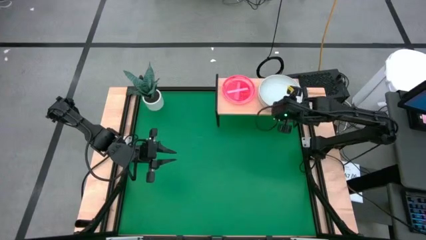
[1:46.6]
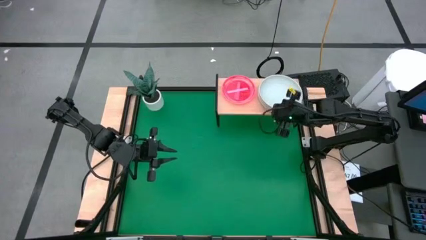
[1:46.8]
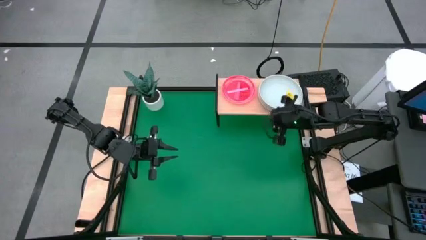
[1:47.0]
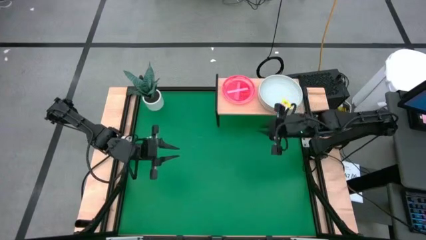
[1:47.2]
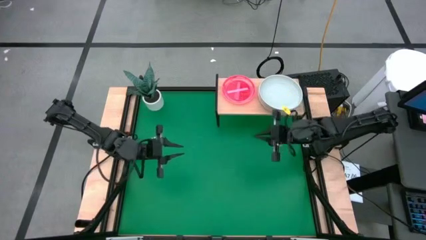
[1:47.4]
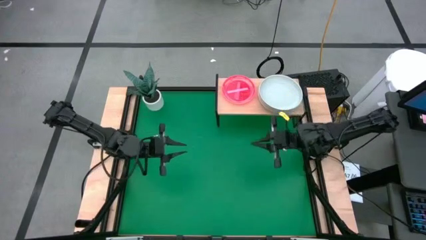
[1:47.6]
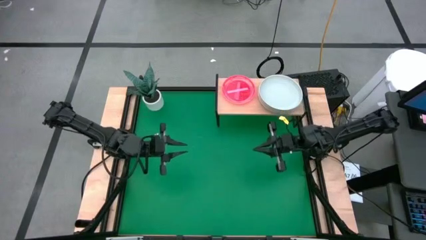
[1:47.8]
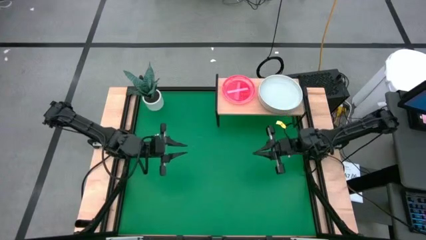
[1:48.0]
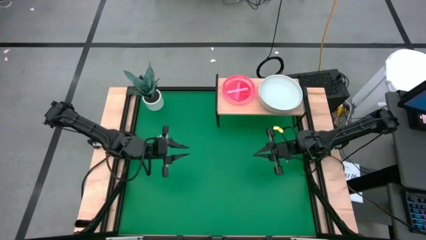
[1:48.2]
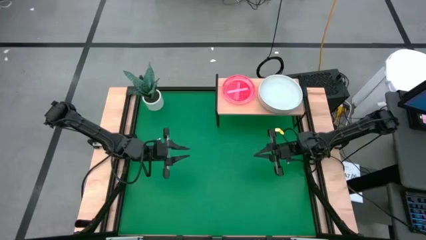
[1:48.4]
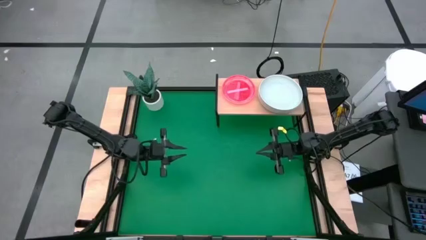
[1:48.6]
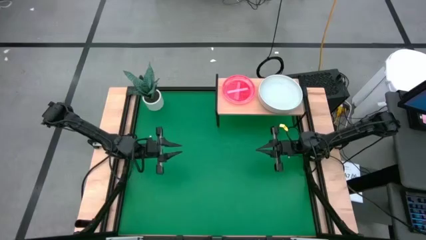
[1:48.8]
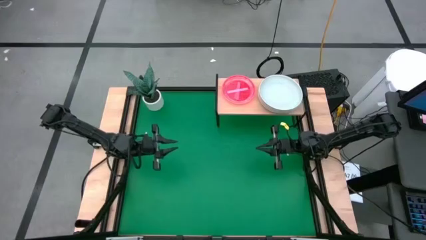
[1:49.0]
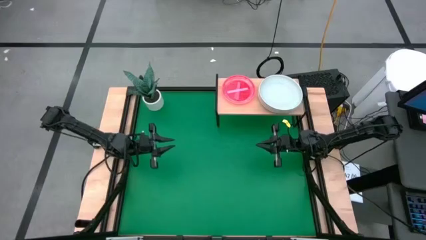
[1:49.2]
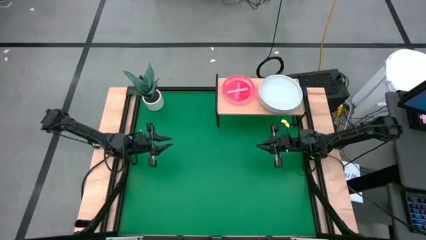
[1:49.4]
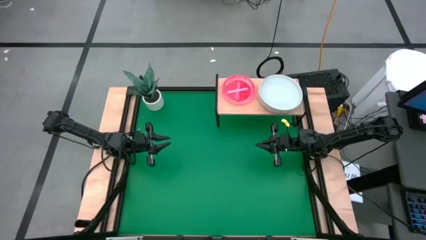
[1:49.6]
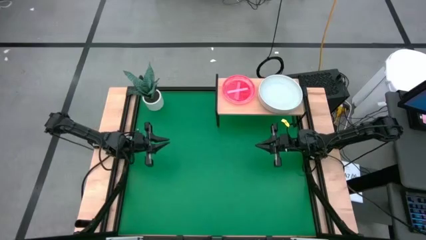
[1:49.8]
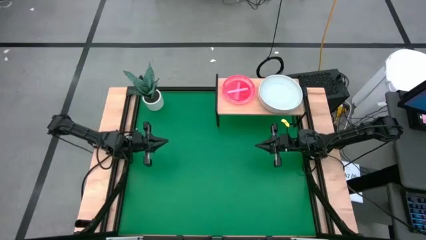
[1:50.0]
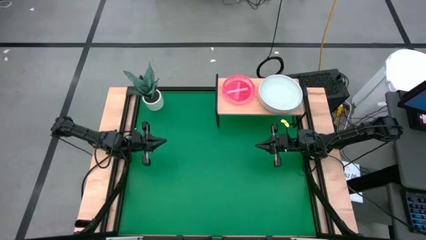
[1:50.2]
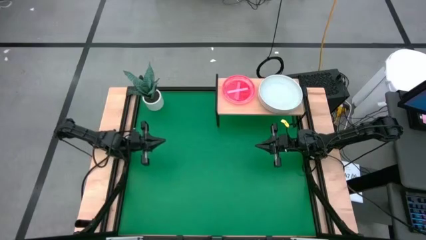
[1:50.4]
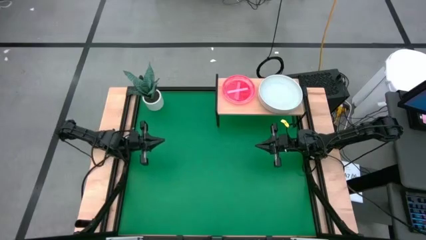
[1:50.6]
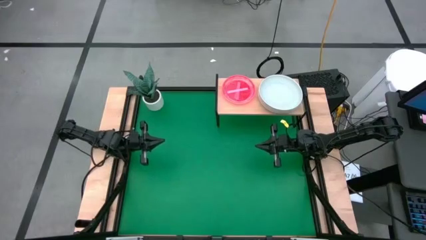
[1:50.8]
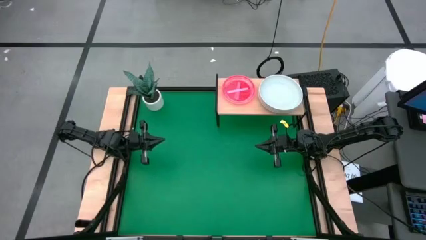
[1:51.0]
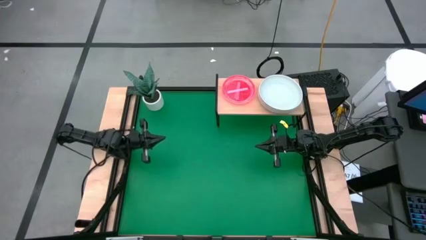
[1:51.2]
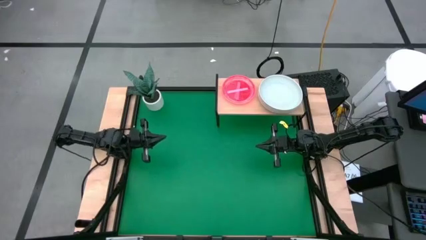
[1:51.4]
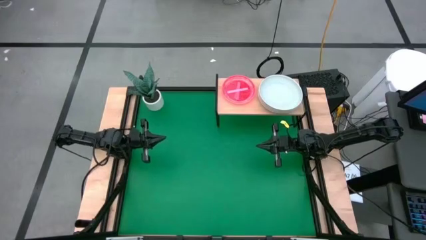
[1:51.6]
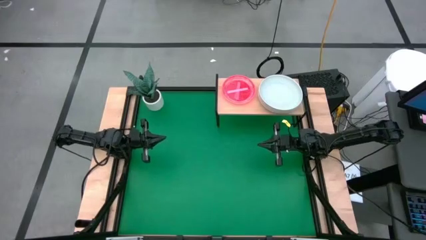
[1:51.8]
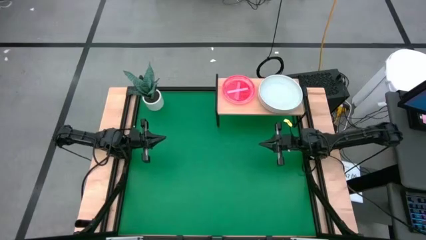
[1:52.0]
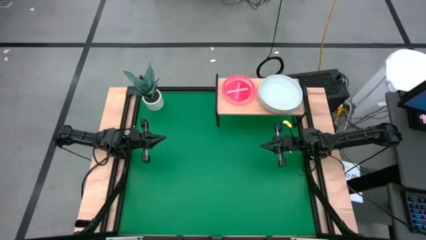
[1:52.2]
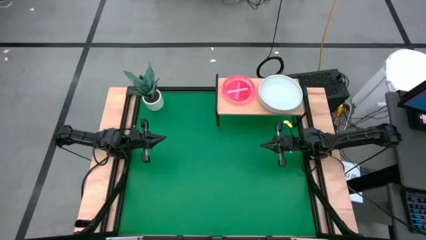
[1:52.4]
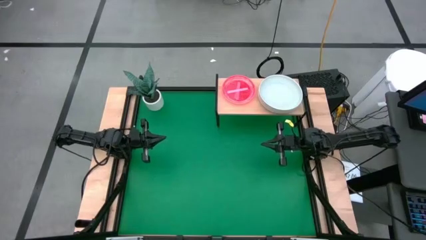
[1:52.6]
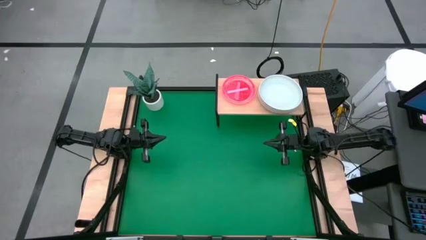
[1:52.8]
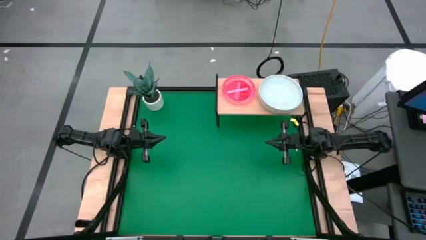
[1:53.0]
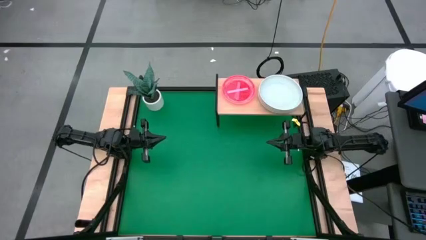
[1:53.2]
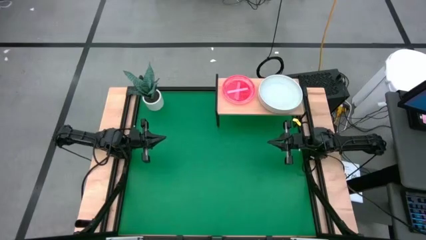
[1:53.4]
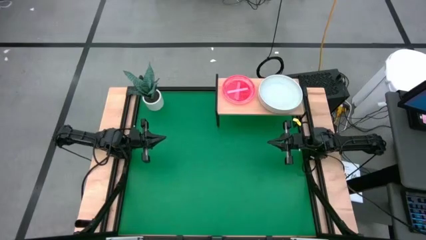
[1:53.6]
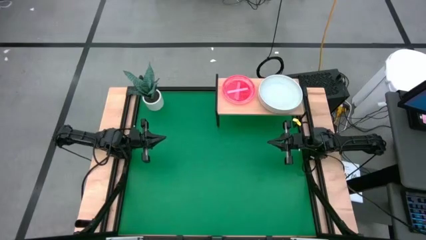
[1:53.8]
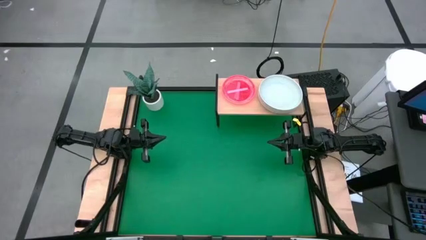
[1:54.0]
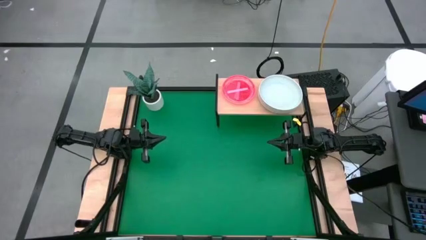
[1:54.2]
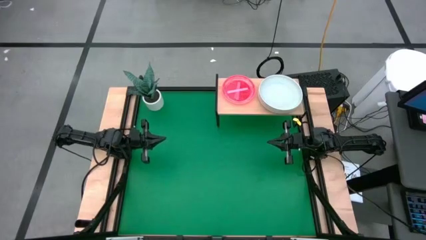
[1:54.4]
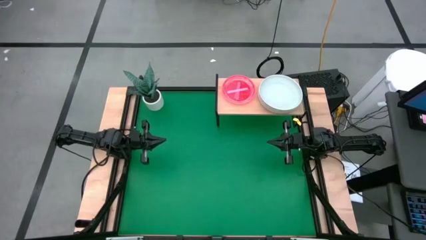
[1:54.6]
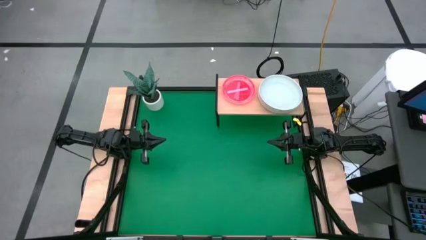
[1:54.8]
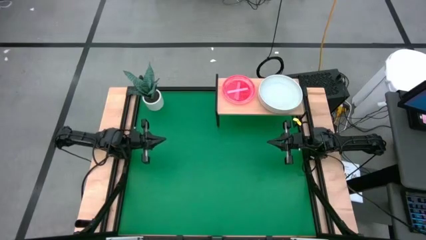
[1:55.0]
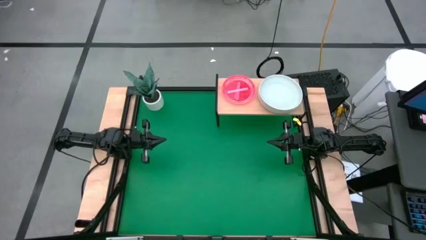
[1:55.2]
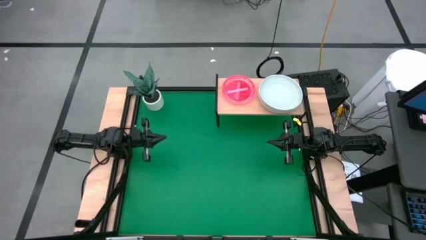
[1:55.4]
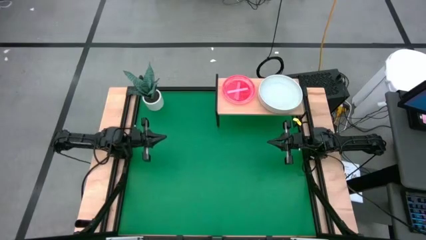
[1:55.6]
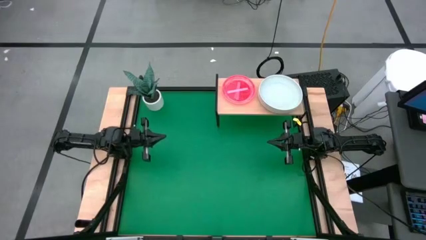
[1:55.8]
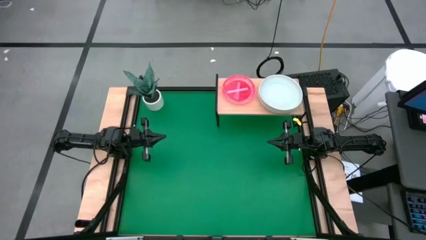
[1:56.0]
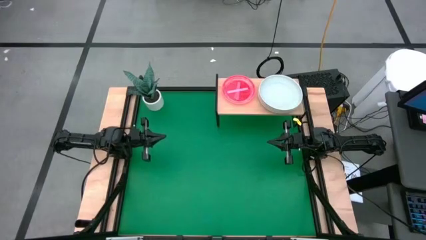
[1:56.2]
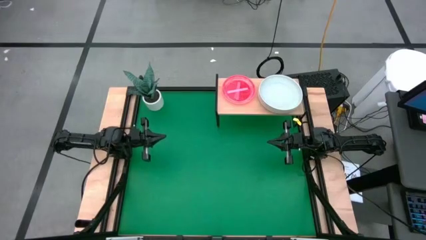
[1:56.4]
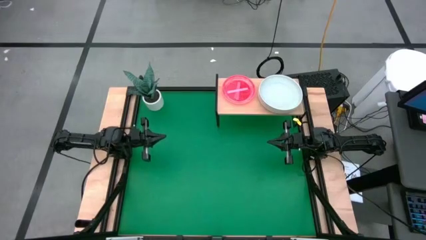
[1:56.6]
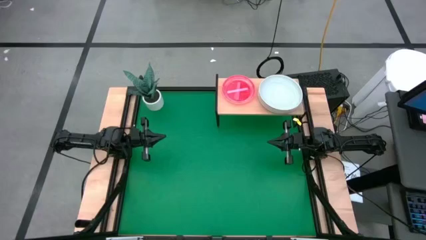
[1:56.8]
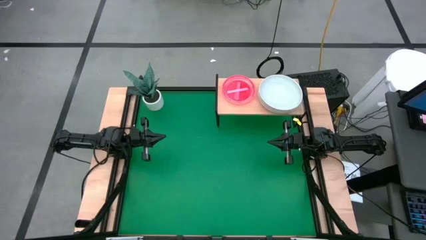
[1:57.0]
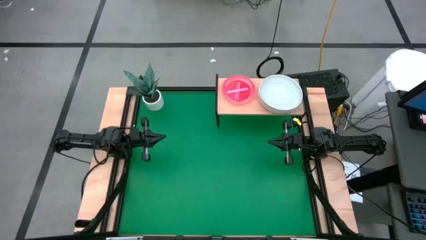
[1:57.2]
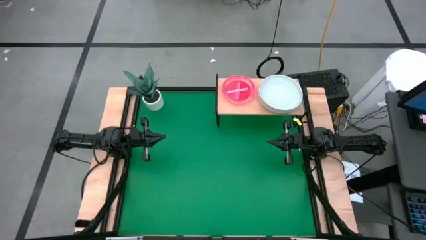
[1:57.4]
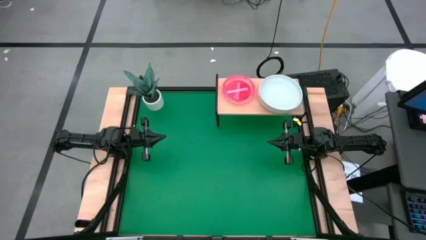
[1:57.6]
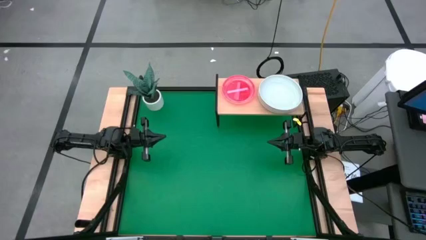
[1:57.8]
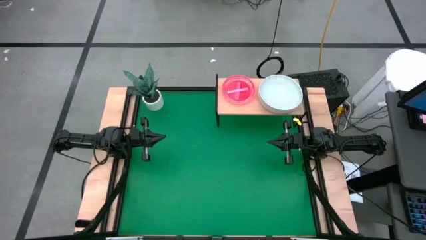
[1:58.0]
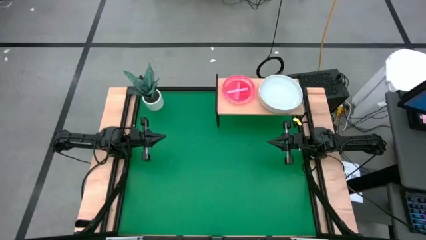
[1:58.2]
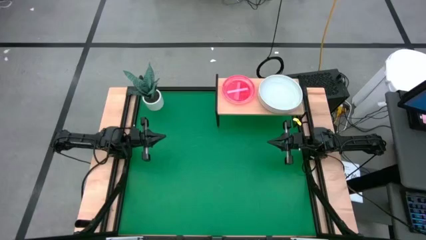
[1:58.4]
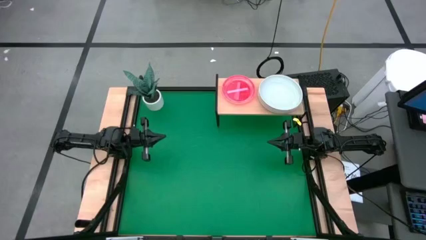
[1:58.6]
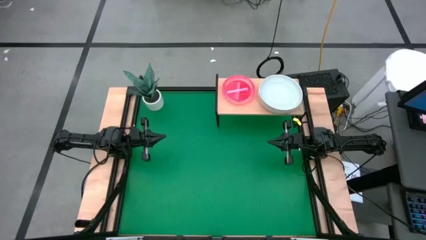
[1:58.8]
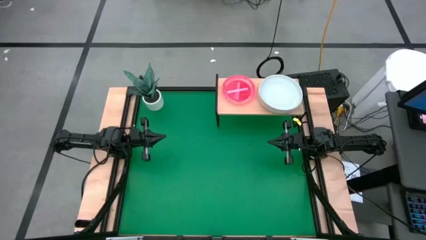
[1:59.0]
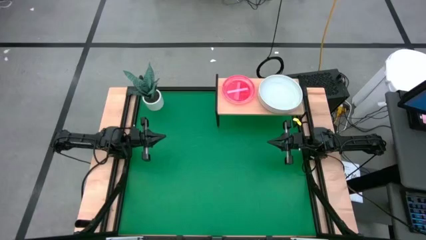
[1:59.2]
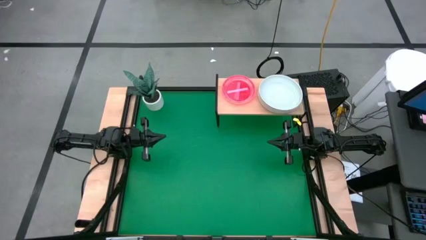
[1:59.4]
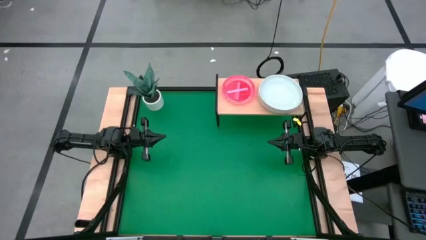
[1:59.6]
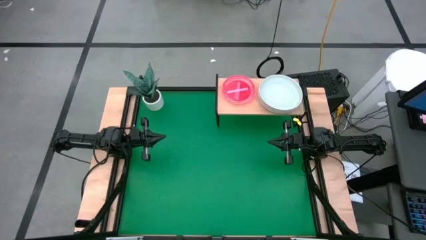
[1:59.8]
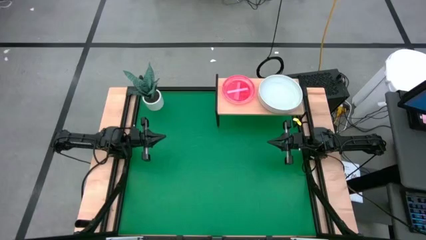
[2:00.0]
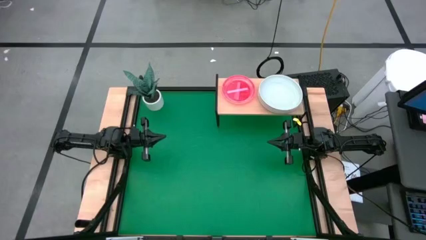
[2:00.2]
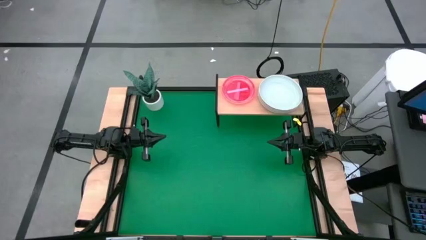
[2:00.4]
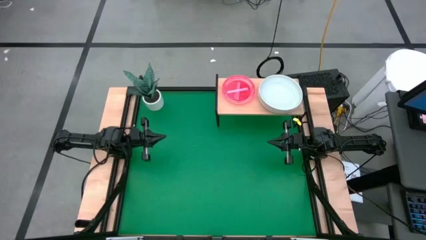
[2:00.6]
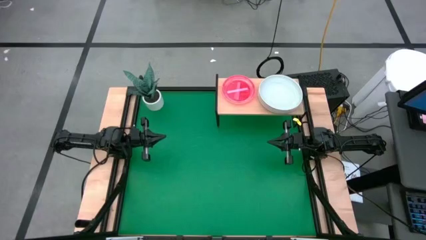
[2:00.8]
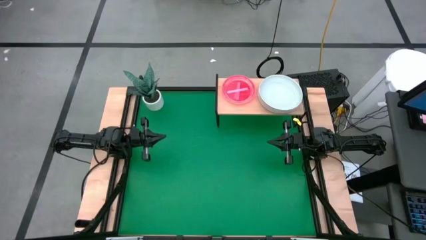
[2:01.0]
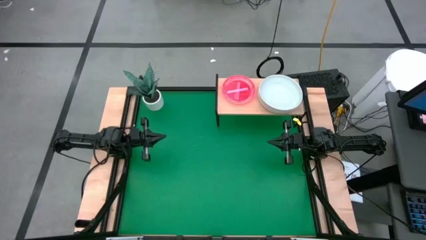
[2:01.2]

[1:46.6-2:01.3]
Task: Place and stack plates onto a shelf
Return to Home Position

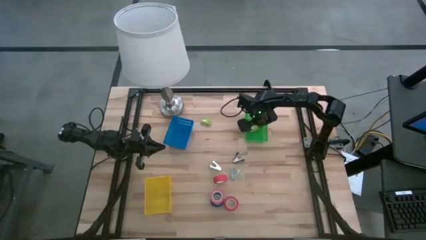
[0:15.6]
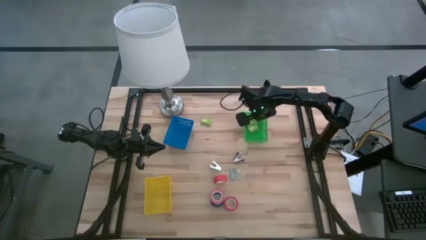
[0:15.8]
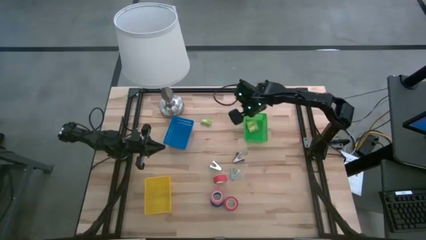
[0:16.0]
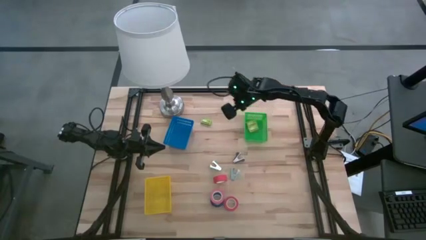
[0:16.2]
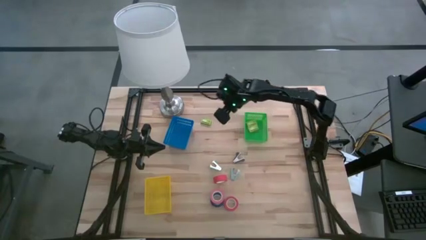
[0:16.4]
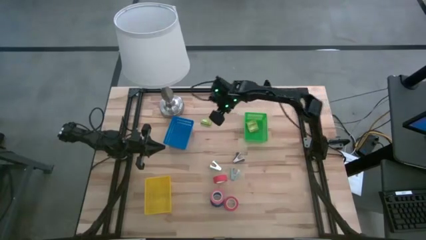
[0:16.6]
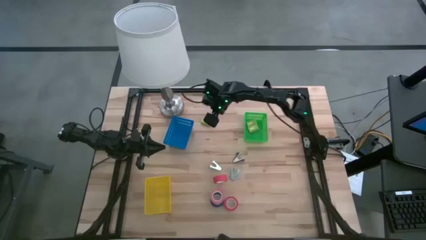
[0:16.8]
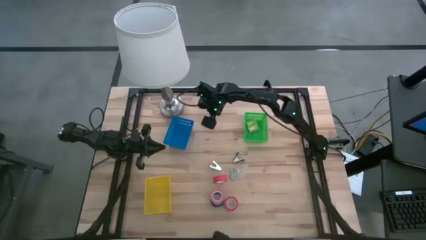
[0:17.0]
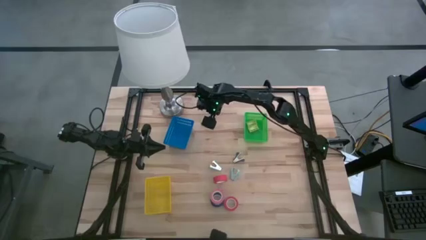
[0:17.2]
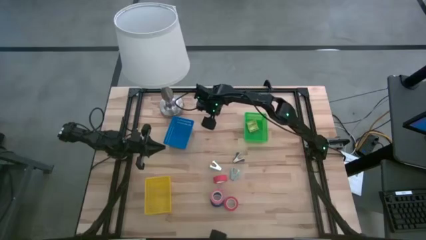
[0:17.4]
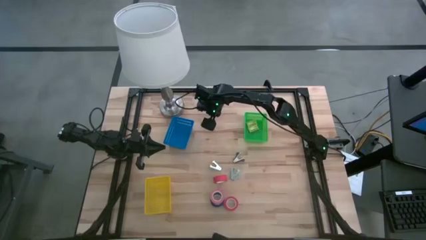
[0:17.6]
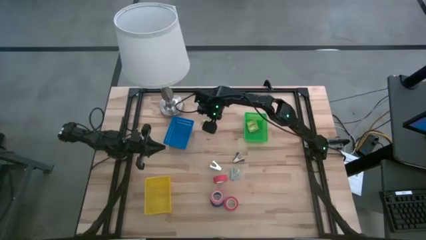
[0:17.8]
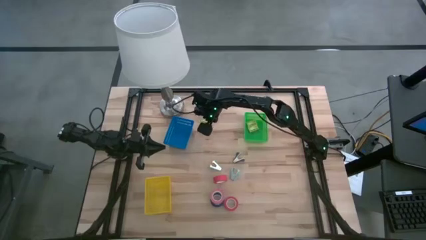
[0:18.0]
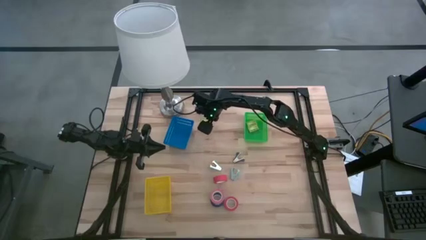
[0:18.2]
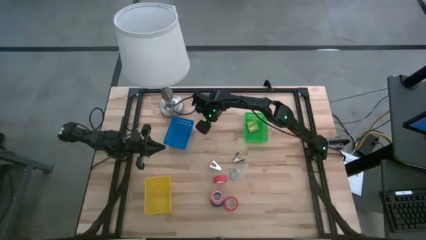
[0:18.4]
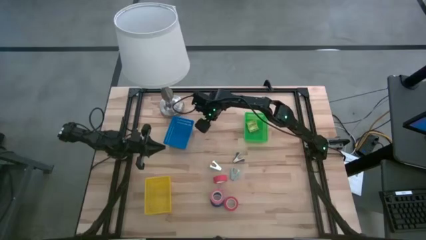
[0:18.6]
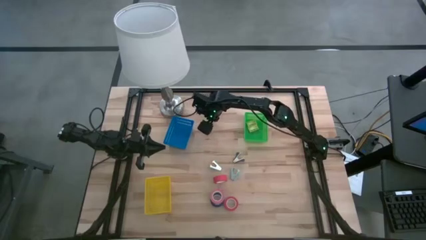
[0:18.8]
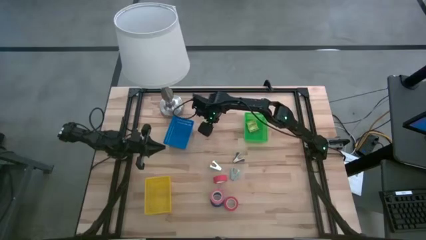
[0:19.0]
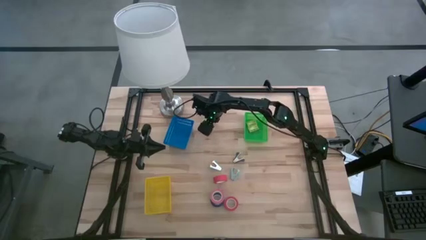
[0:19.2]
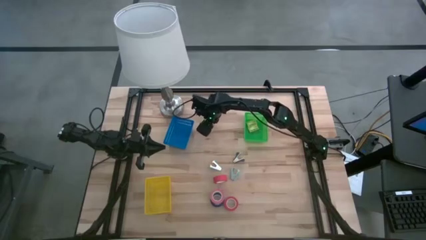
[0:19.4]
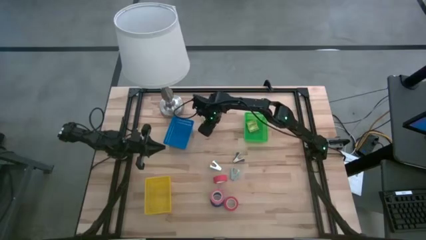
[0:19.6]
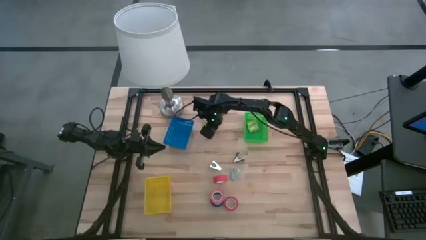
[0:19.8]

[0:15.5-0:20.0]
Task: Pick and place Stapler, Stapler remover, tape
Put the green staple box into the green bin
